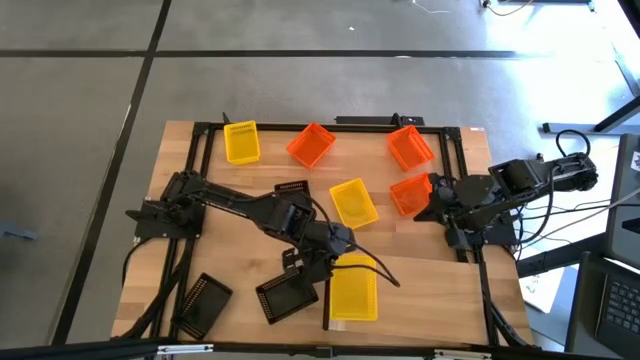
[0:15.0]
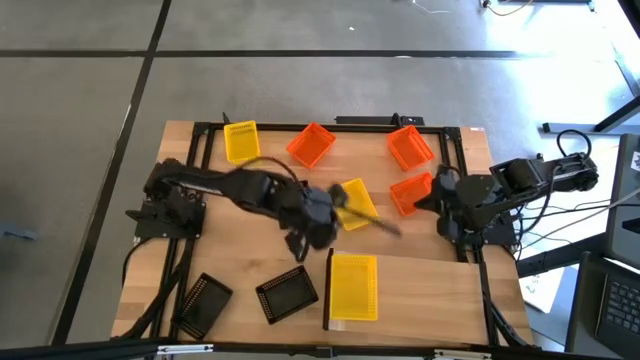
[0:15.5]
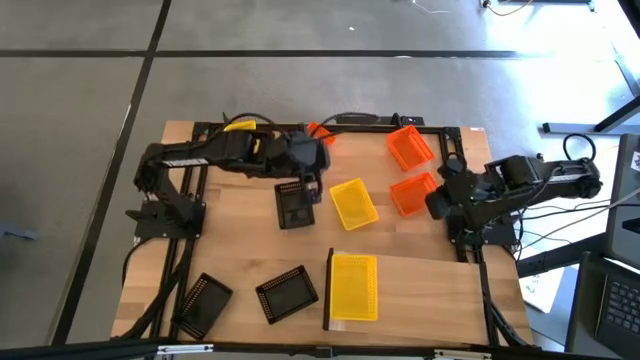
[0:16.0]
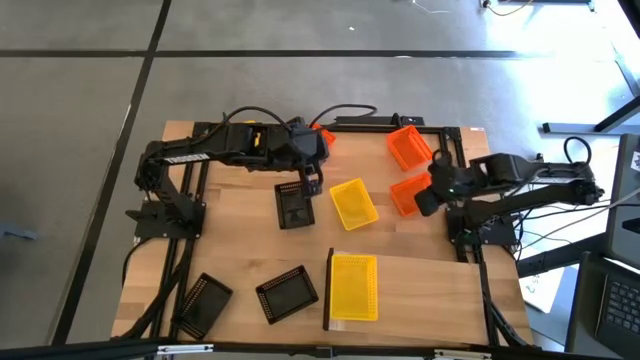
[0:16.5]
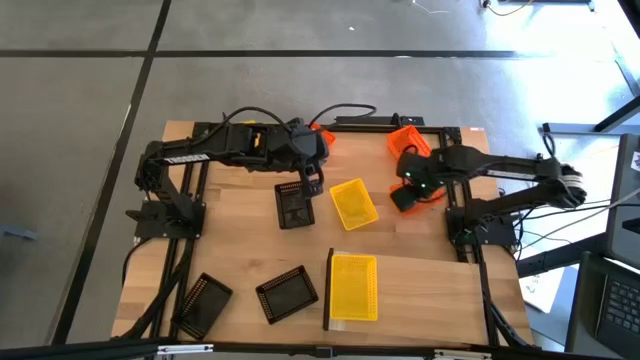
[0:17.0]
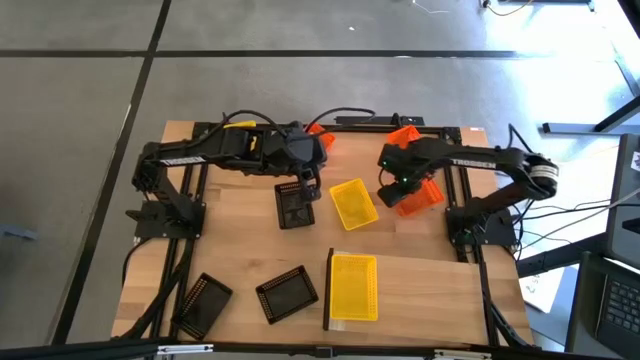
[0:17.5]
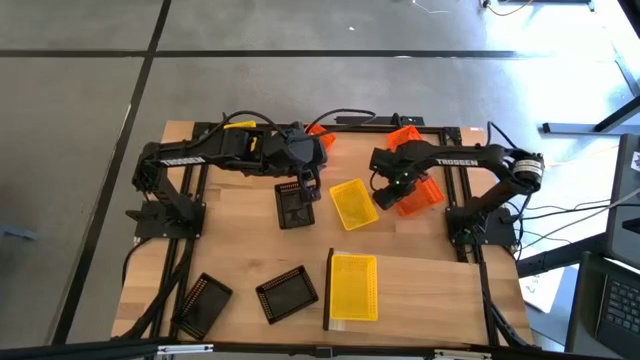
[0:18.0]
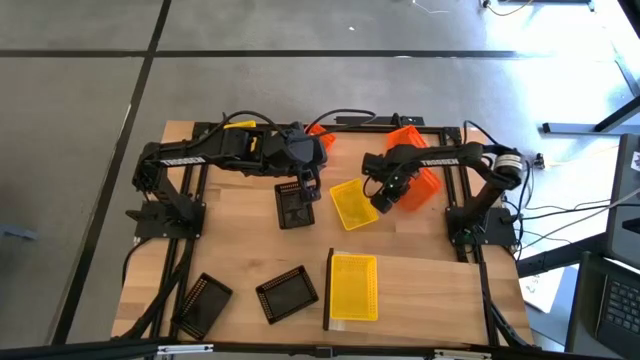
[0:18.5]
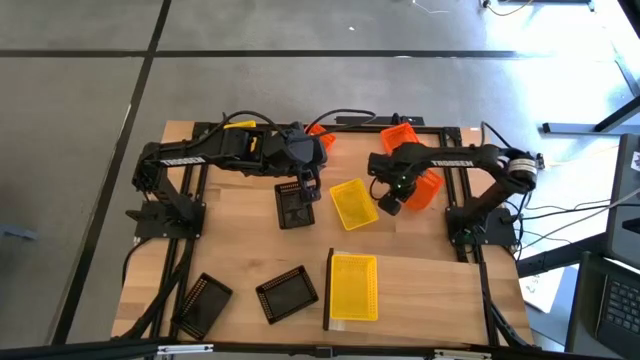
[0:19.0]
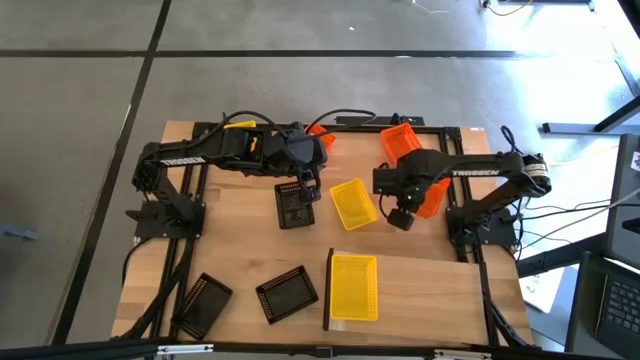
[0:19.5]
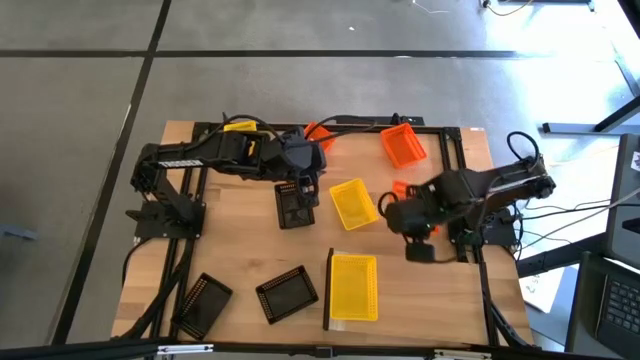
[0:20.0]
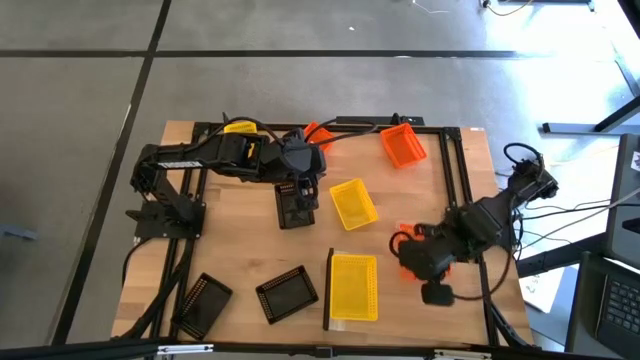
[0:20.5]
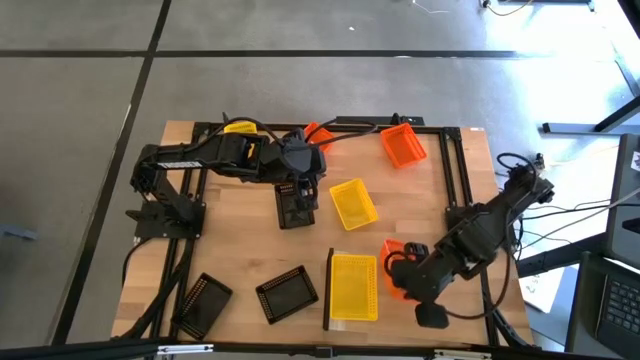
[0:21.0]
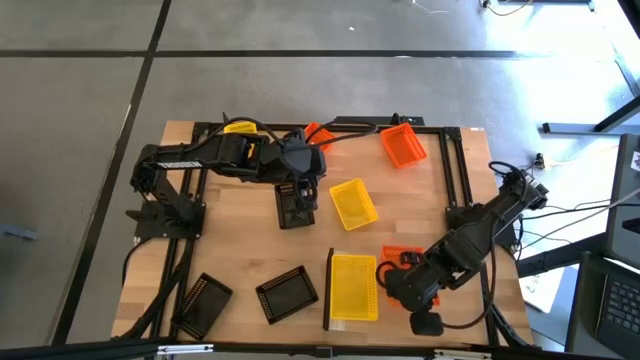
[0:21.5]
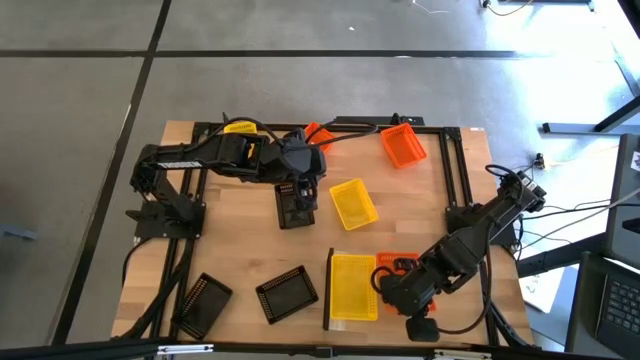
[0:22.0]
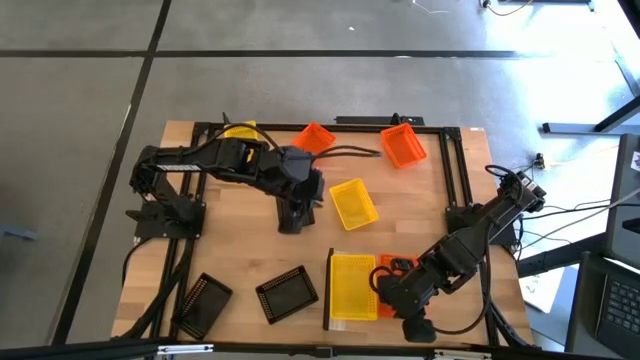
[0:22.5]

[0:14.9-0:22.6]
Task: Stack baskets on shelf by color
Put the bottom right orange bin on the shelf

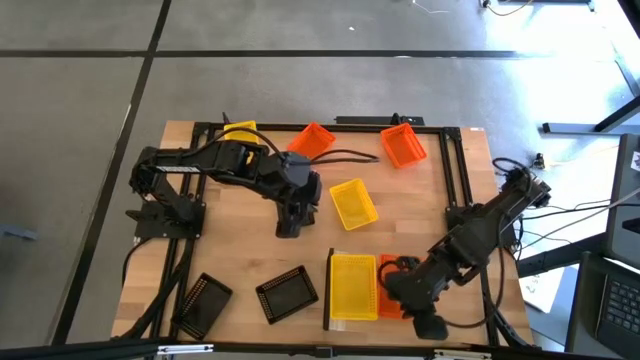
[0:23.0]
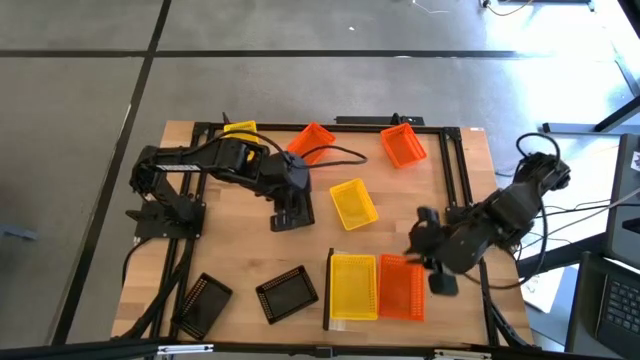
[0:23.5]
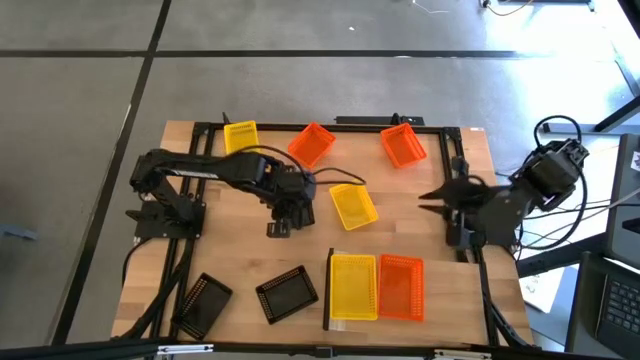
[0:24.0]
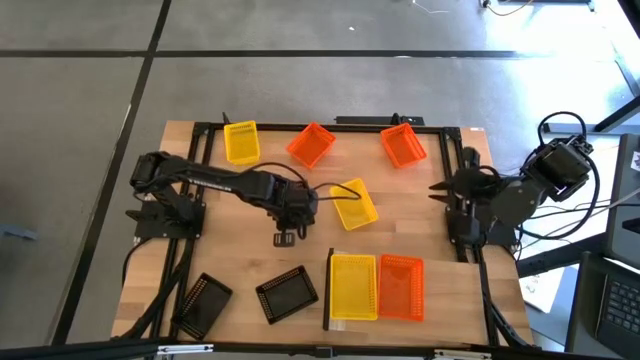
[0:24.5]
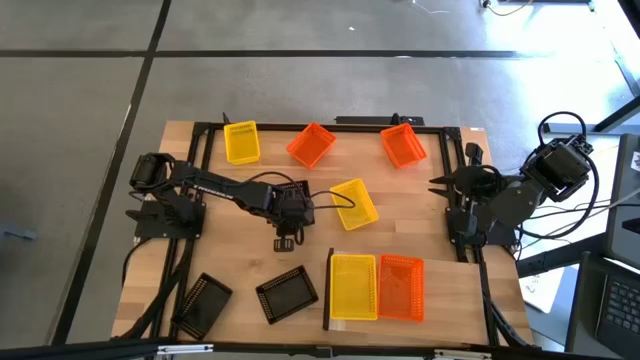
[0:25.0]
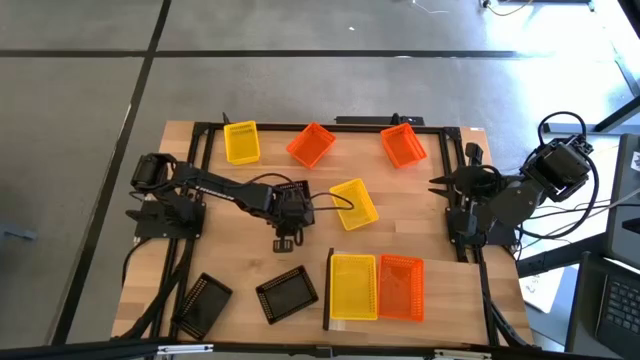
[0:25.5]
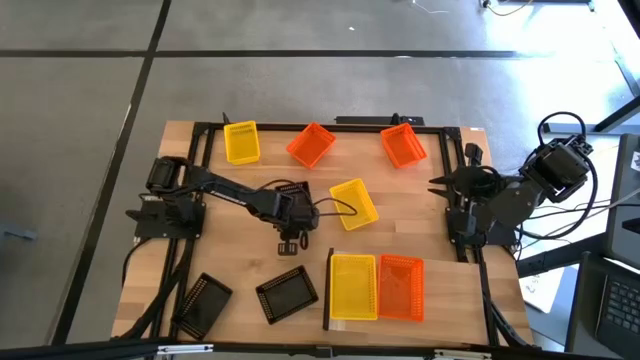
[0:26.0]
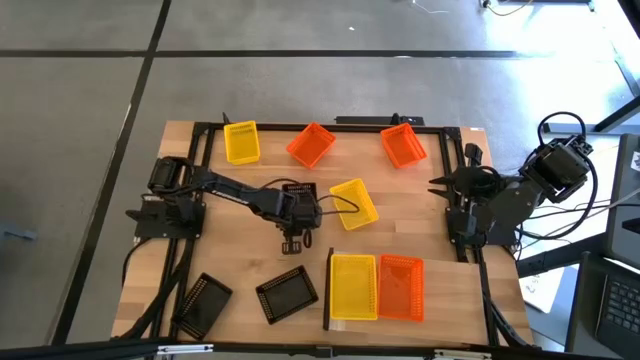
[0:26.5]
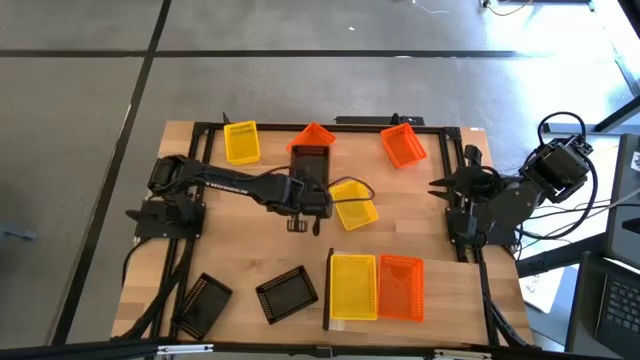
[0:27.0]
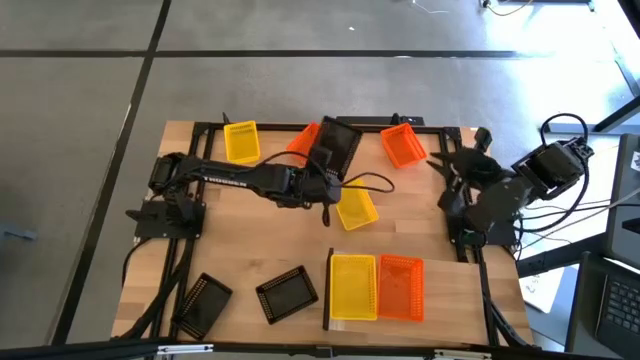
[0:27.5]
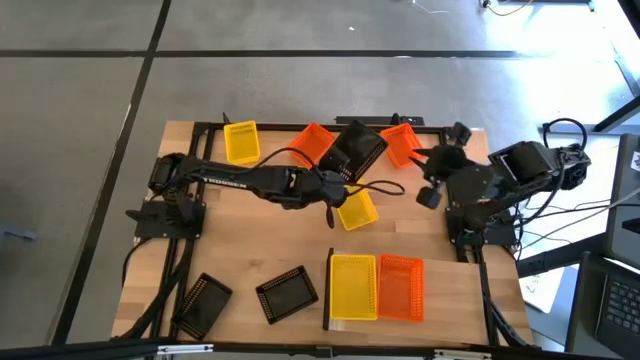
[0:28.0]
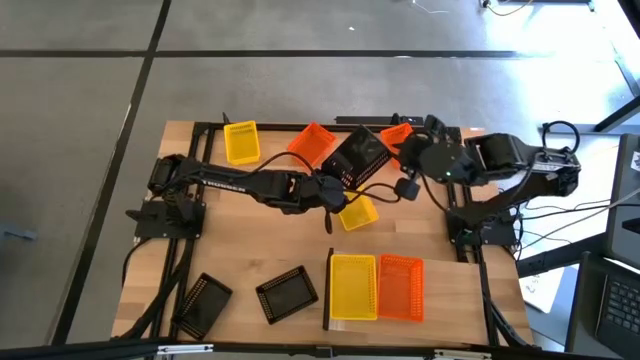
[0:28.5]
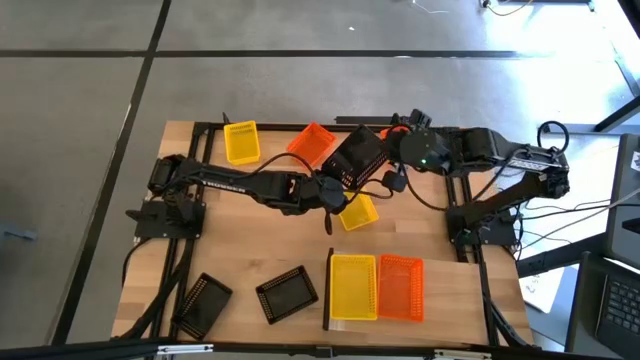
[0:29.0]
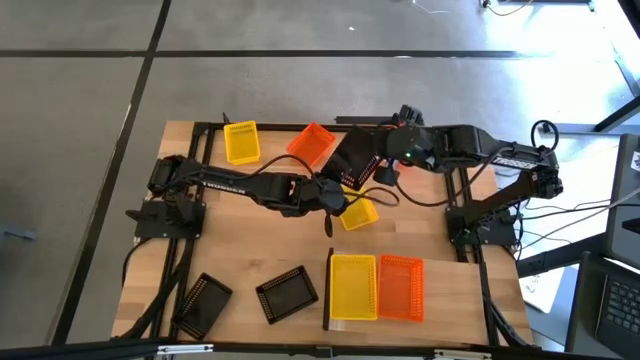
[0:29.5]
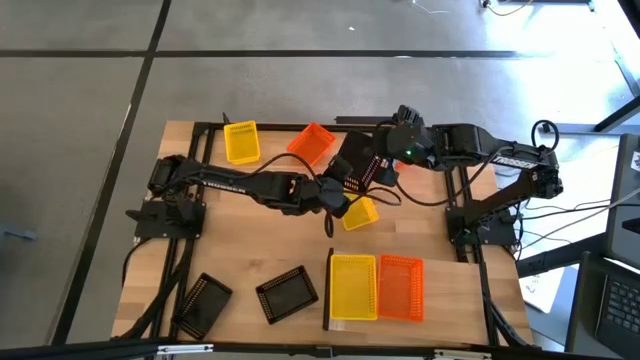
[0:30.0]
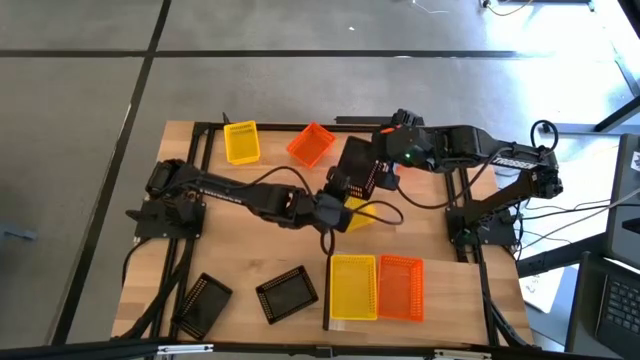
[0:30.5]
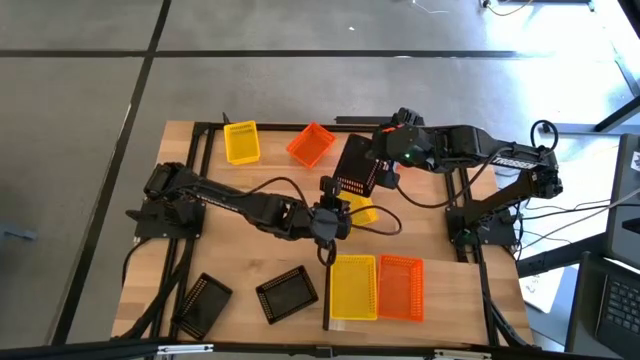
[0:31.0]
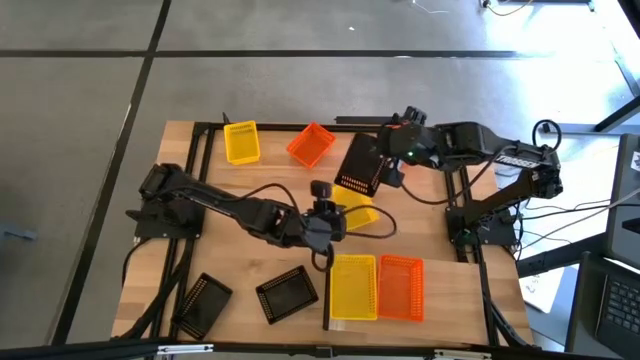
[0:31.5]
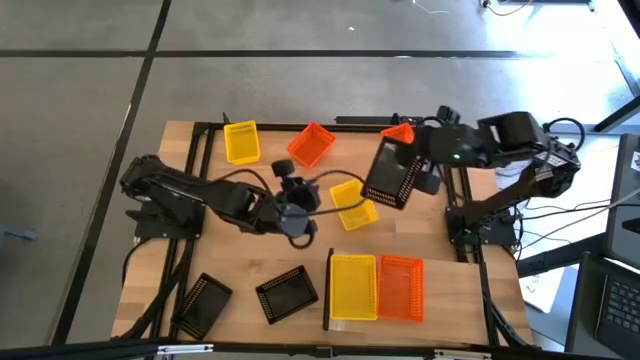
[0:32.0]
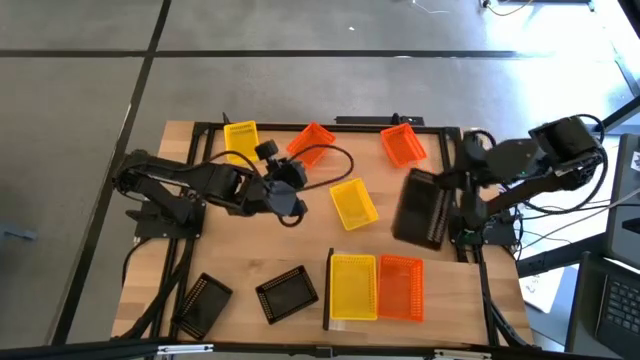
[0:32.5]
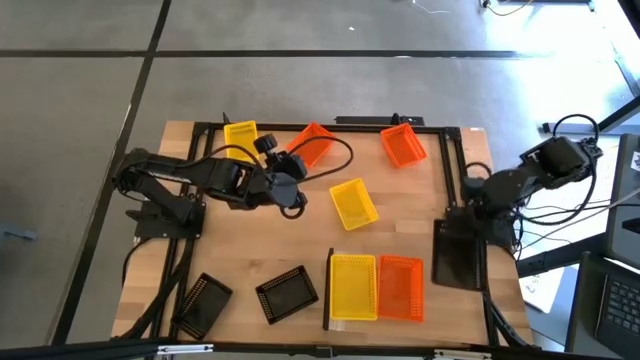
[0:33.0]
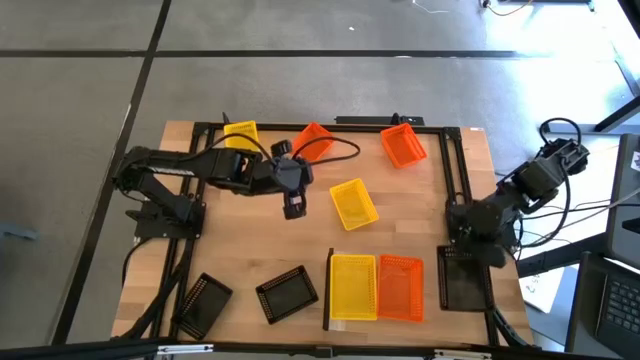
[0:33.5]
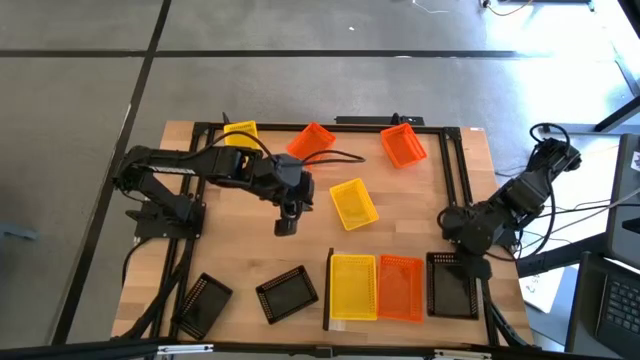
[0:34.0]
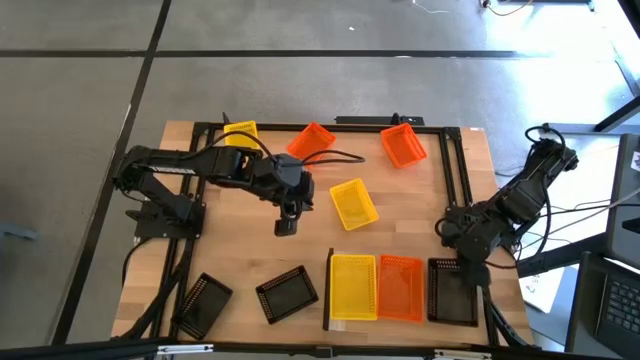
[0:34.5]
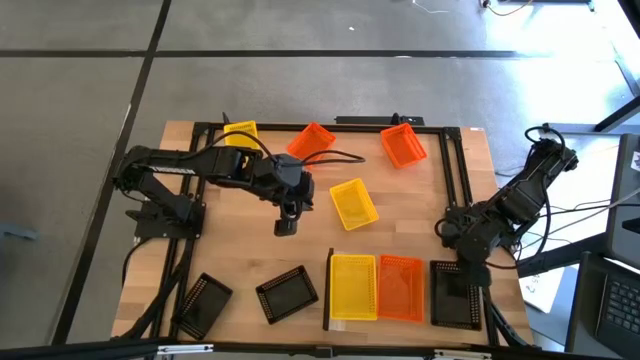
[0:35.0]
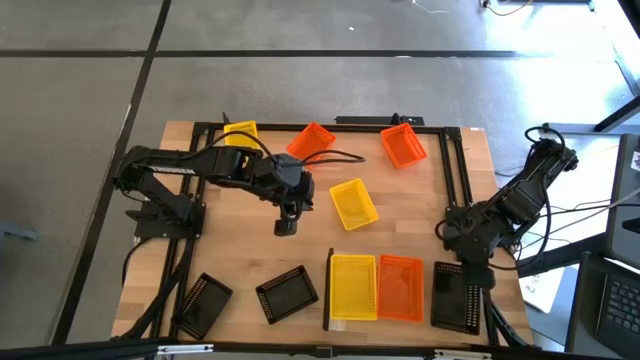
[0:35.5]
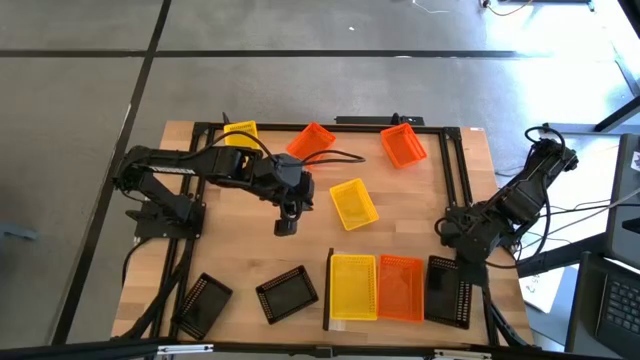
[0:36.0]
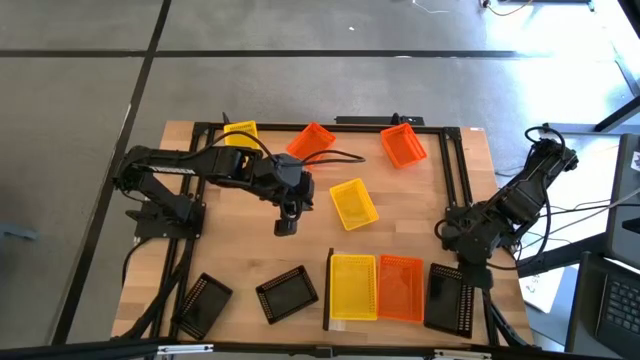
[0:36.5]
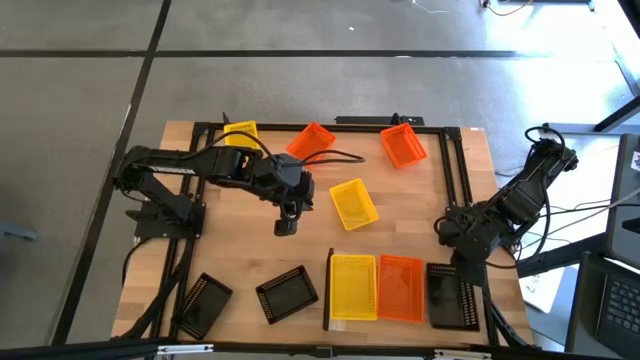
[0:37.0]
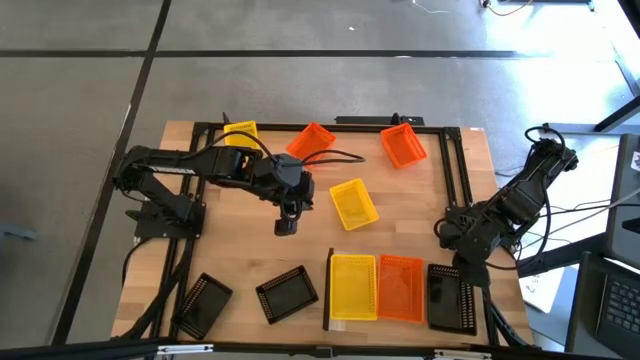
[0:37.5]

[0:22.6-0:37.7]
Put the top right black bin on the shelf
